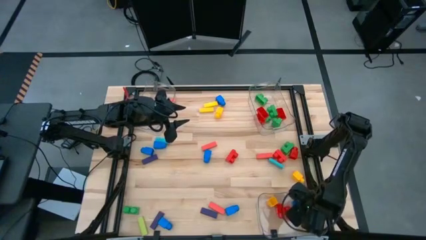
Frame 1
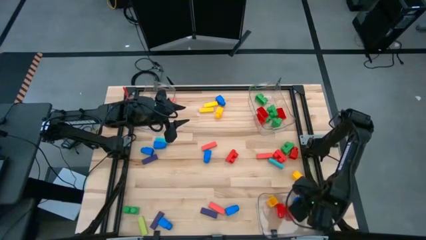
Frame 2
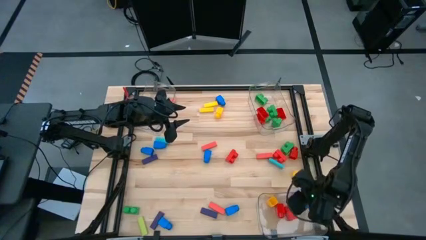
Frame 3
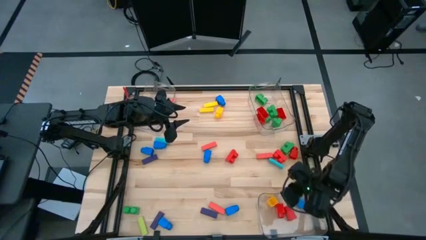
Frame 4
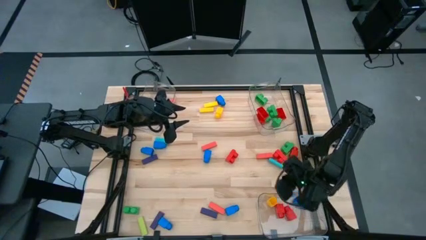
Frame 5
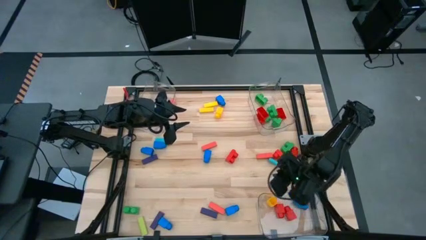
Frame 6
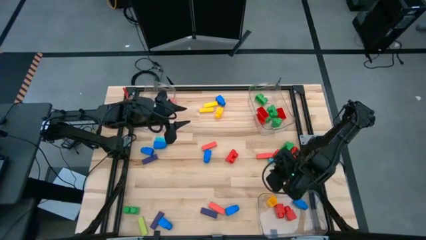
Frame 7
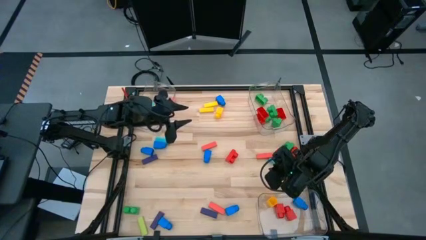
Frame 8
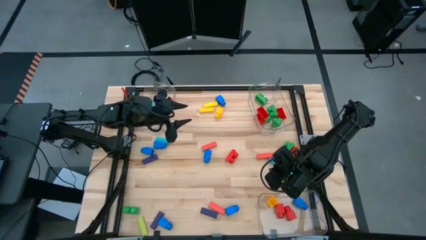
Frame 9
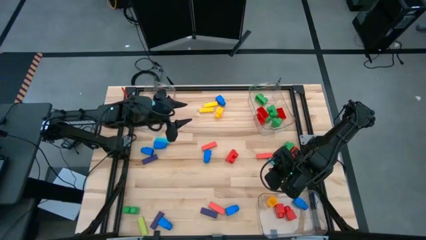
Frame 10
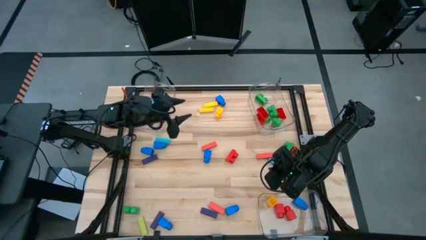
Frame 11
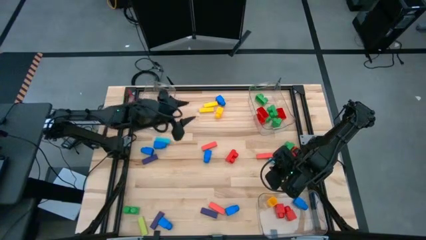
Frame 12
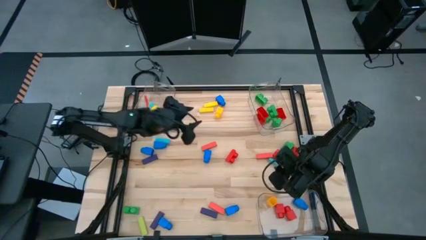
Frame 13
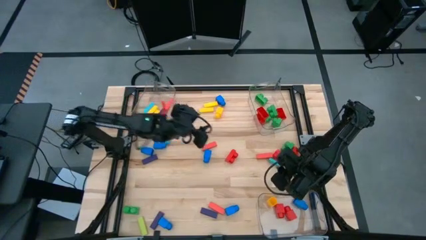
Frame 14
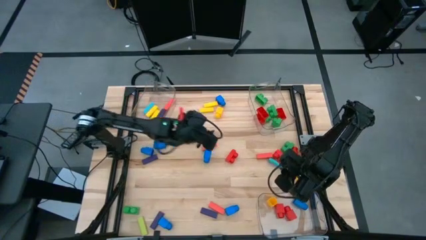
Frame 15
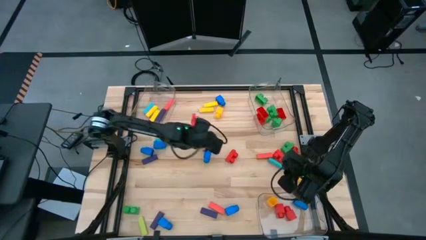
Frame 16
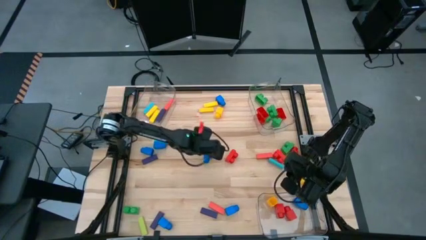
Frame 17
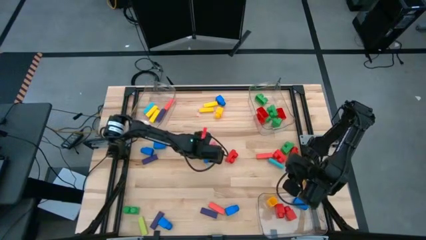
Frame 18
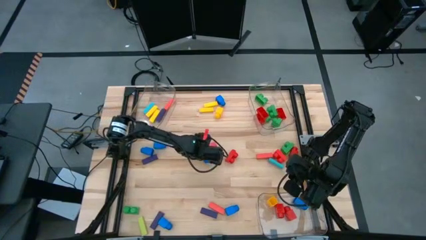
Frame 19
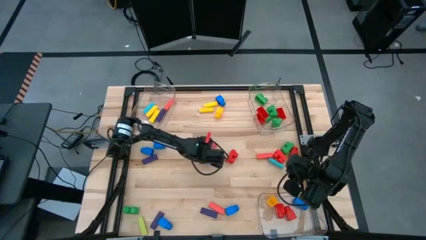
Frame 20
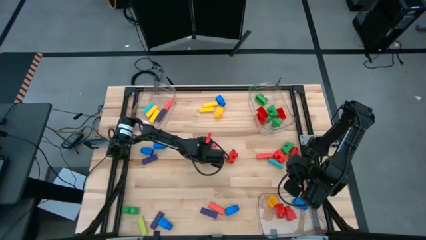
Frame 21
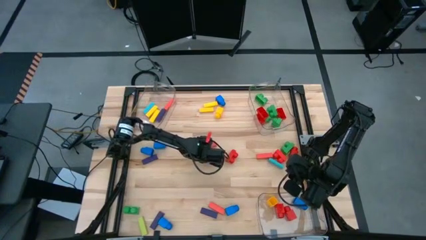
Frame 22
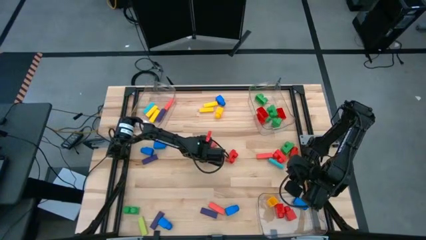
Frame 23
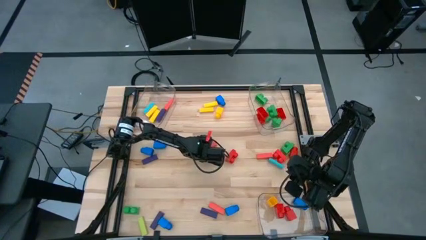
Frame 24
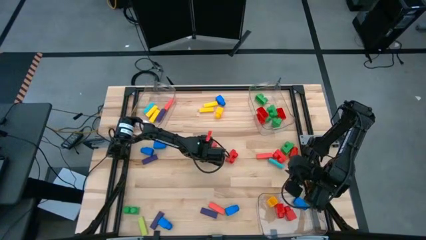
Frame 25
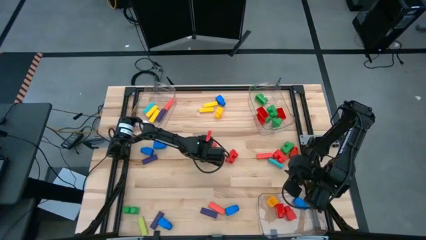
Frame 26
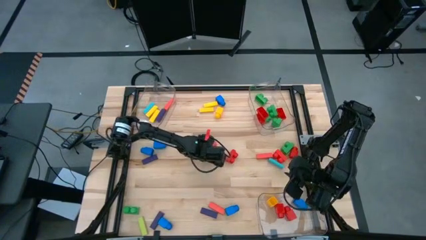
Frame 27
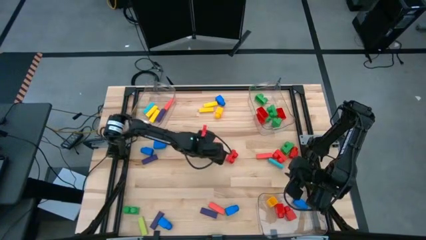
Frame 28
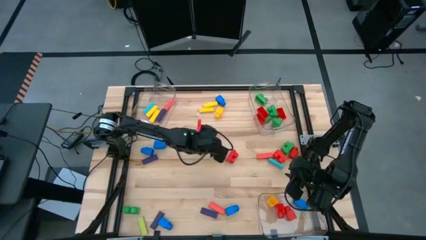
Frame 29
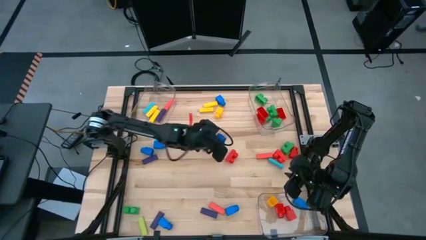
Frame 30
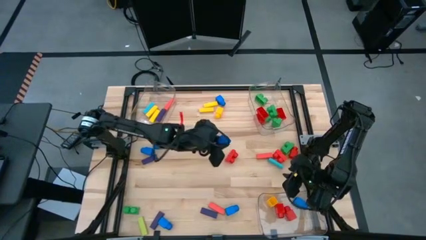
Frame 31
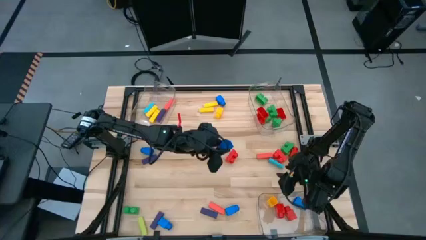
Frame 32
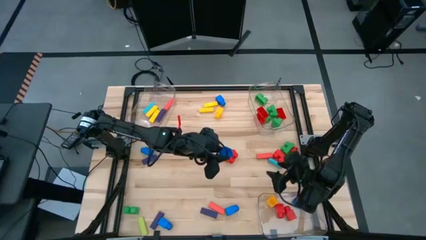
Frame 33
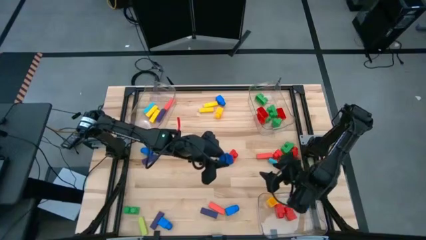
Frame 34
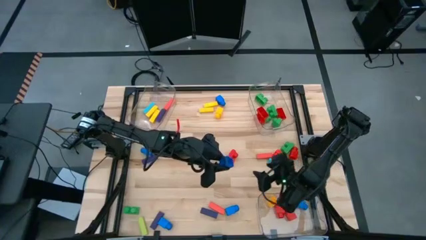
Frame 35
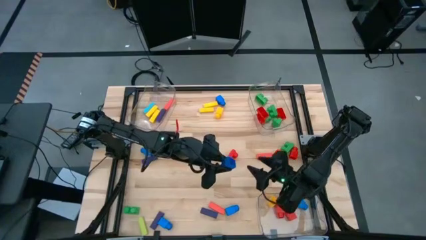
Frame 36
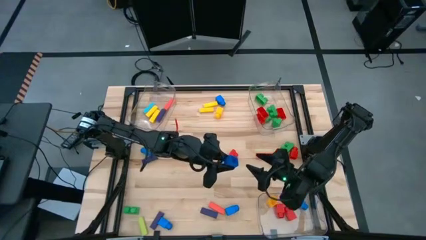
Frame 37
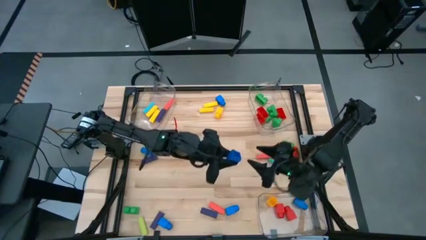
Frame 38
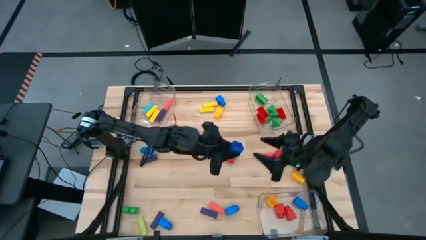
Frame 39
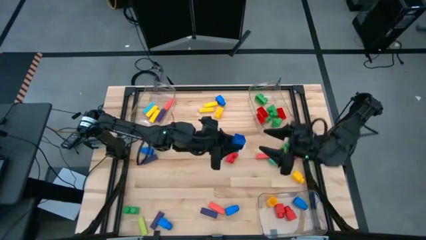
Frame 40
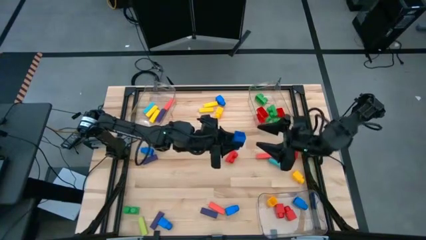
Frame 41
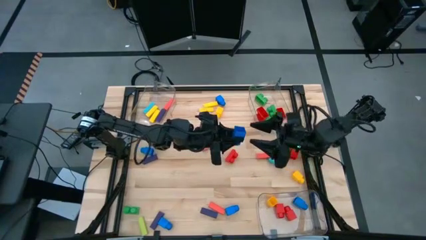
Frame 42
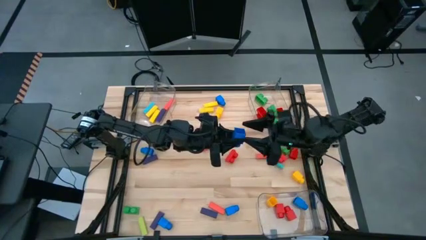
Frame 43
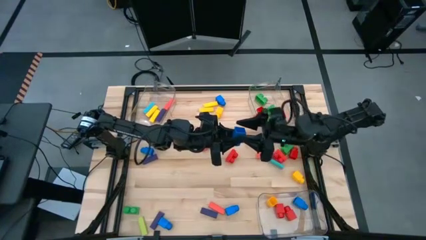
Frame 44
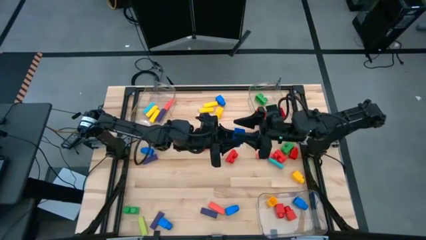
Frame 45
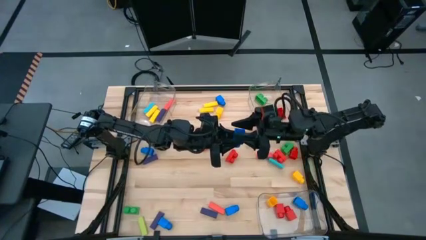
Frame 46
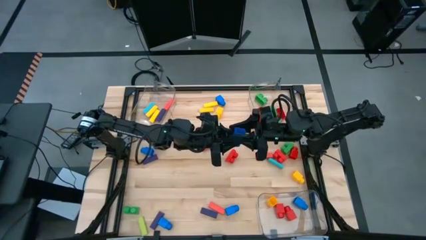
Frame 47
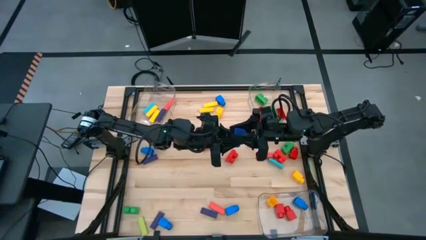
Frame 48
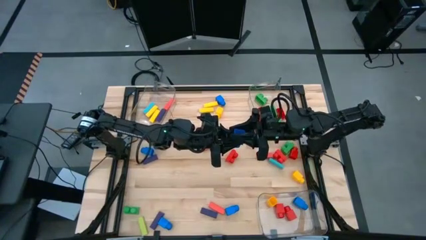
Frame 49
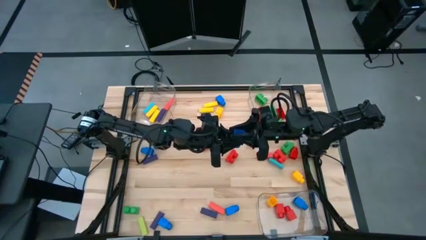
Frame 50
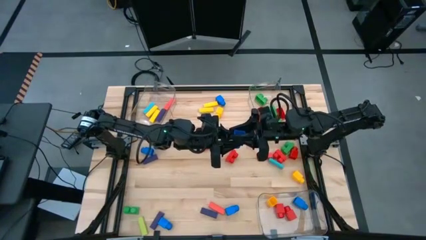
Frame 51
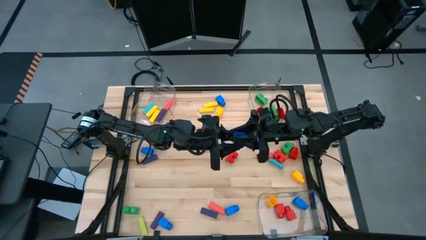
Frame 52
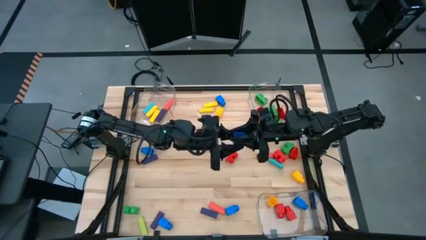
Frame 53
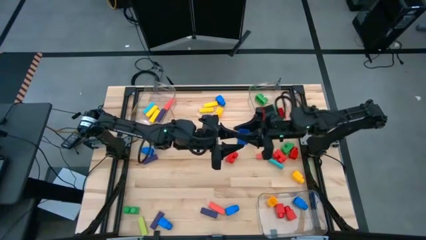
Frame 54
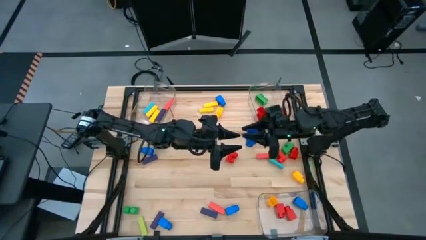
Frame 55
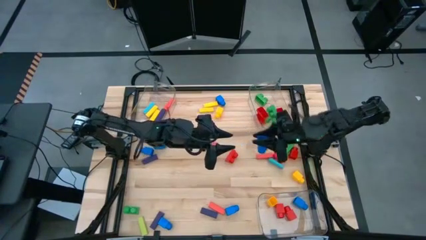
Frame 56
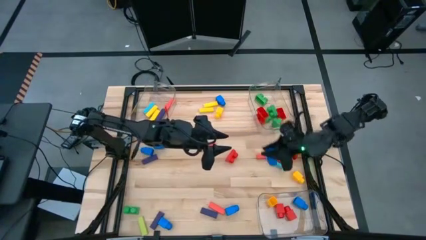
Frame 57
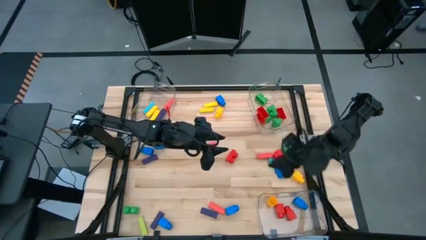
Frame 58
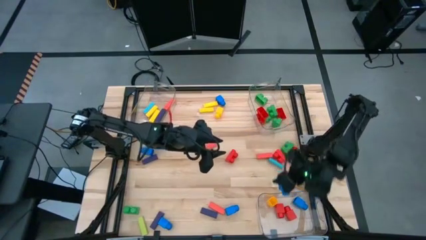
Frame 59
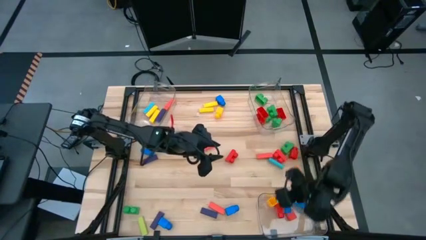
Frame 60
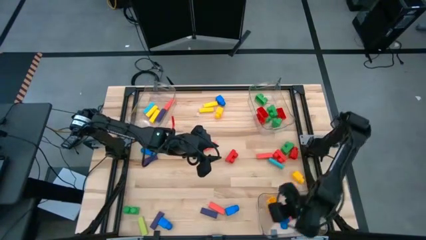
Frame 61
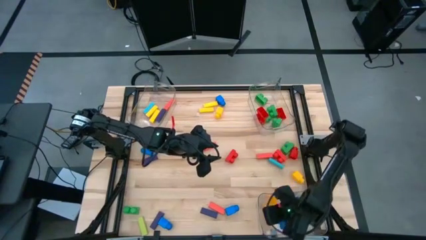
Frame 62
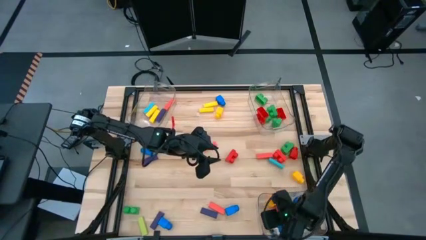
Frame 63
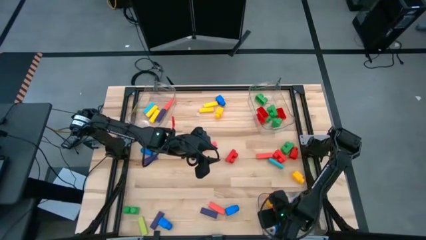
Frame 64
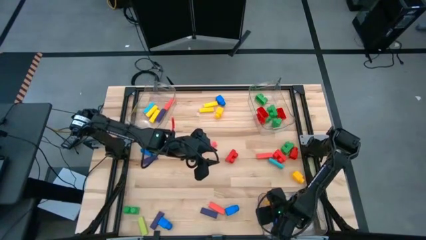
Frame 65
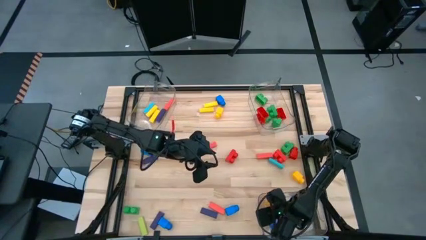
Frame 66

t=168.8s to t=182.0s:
Task: Sort blocks by size
Put the blue 1 stud game piece into the bottom transparent bin
